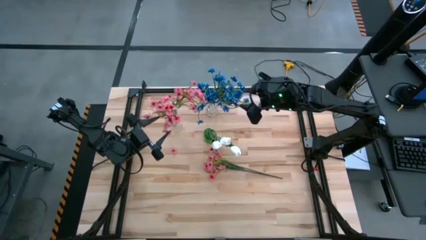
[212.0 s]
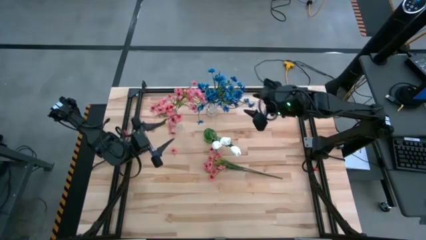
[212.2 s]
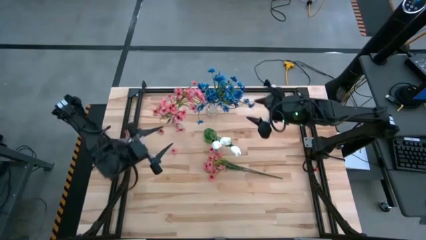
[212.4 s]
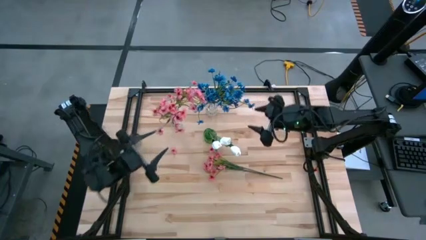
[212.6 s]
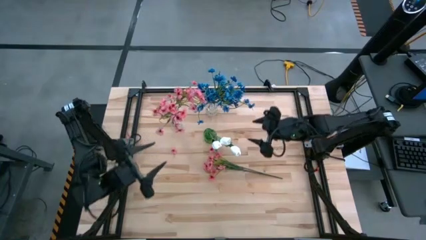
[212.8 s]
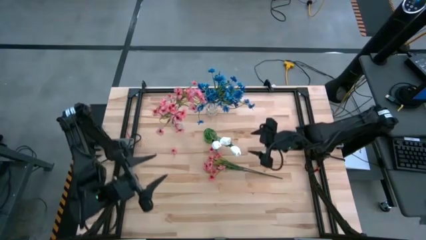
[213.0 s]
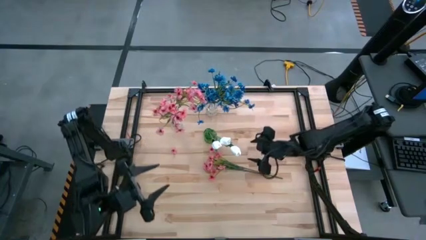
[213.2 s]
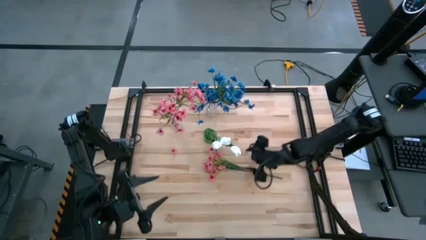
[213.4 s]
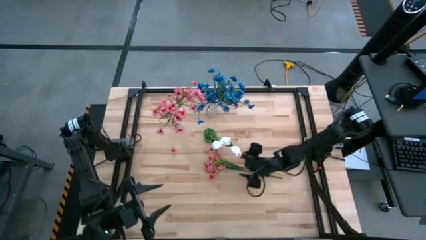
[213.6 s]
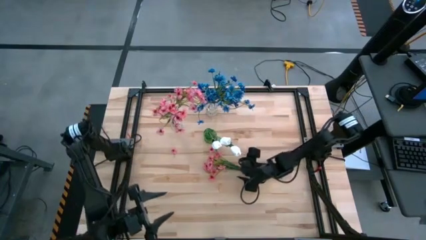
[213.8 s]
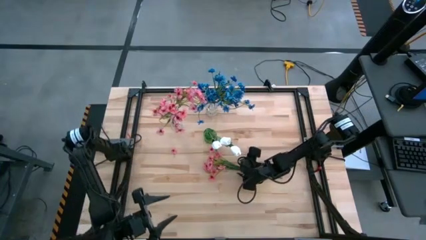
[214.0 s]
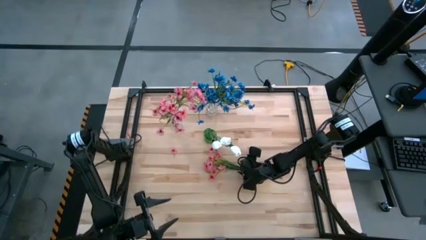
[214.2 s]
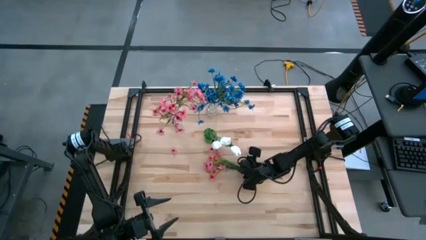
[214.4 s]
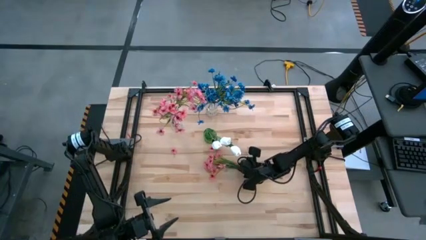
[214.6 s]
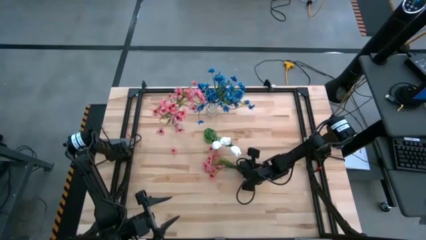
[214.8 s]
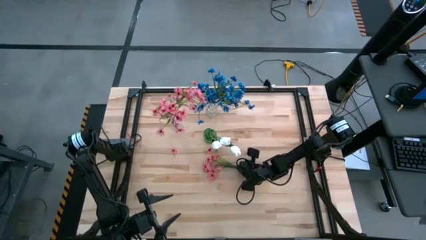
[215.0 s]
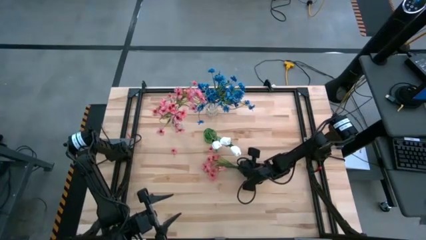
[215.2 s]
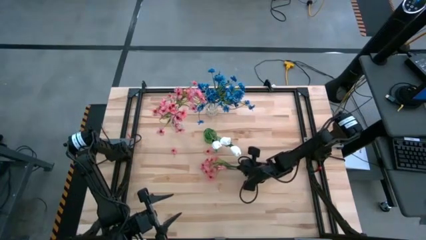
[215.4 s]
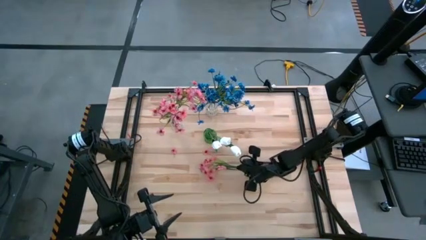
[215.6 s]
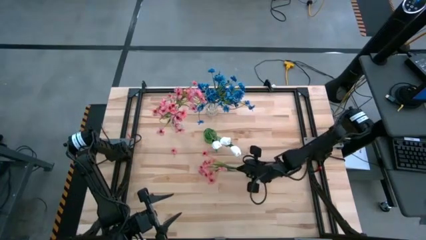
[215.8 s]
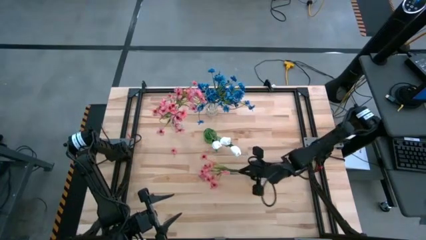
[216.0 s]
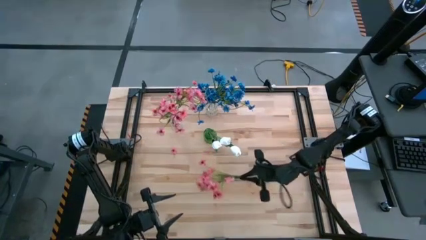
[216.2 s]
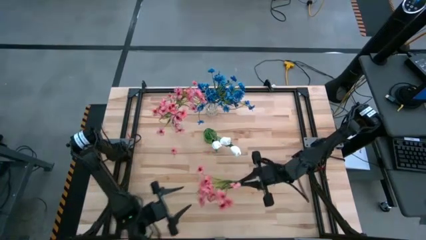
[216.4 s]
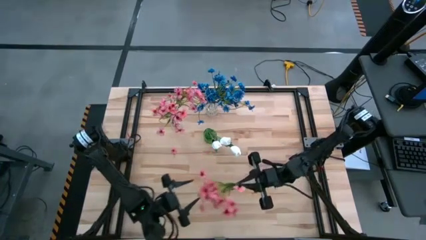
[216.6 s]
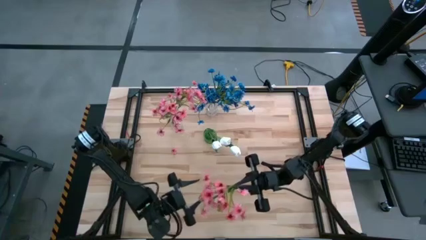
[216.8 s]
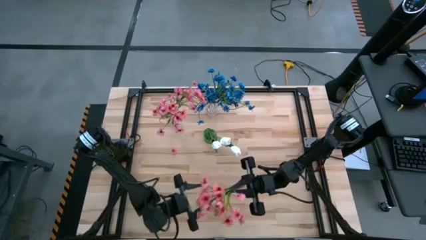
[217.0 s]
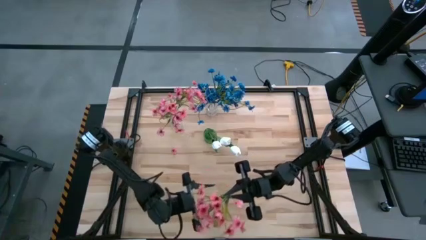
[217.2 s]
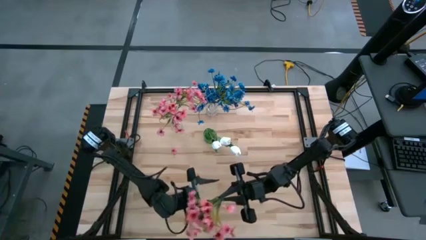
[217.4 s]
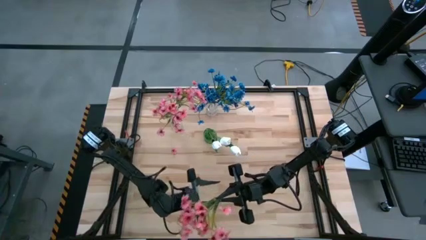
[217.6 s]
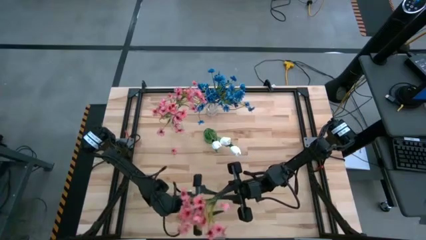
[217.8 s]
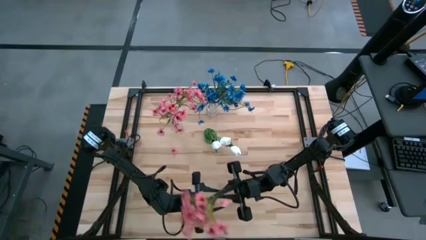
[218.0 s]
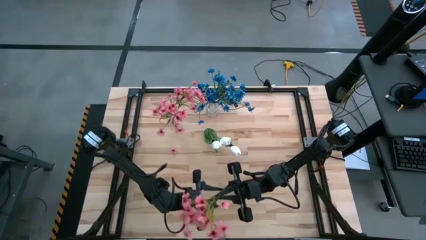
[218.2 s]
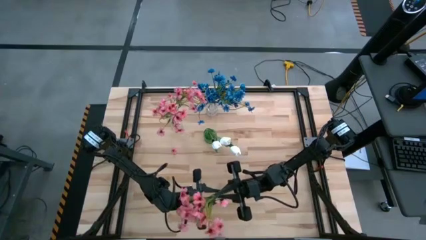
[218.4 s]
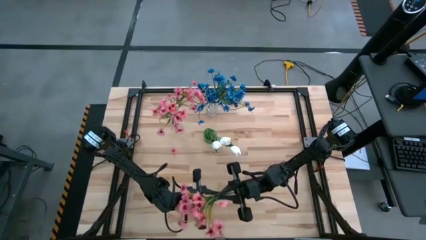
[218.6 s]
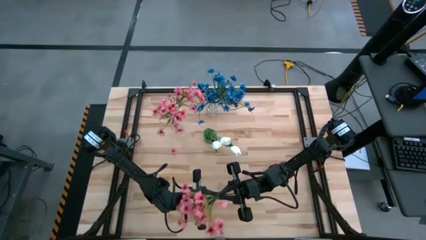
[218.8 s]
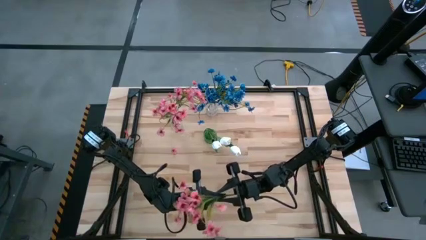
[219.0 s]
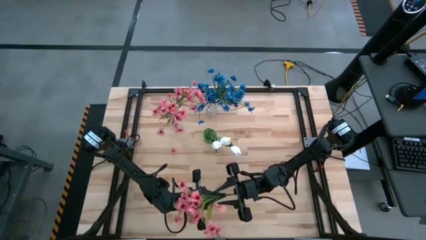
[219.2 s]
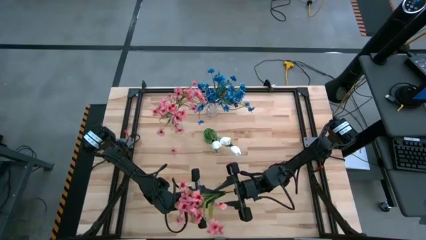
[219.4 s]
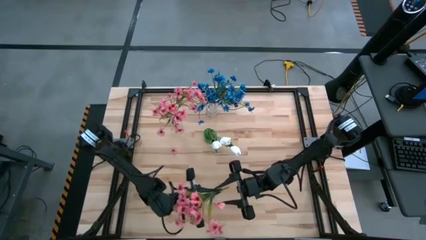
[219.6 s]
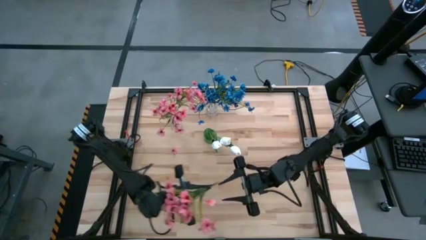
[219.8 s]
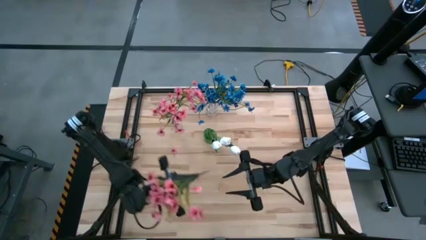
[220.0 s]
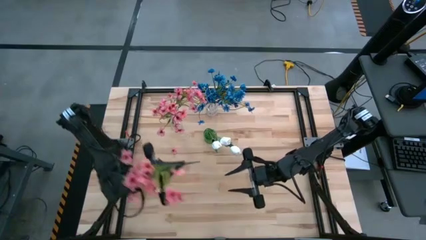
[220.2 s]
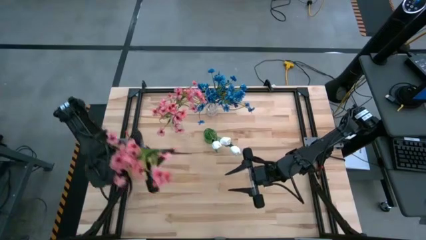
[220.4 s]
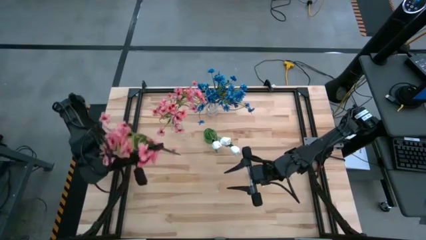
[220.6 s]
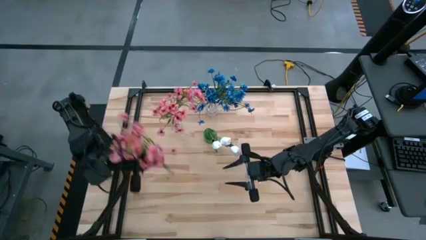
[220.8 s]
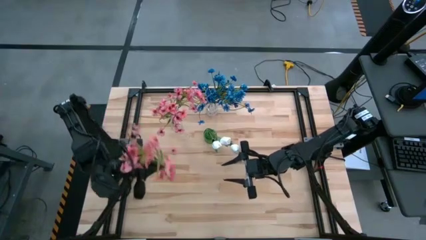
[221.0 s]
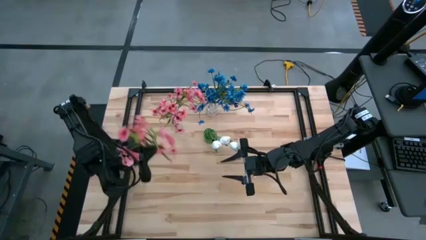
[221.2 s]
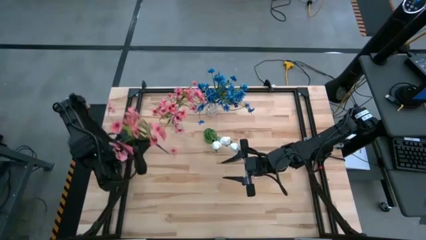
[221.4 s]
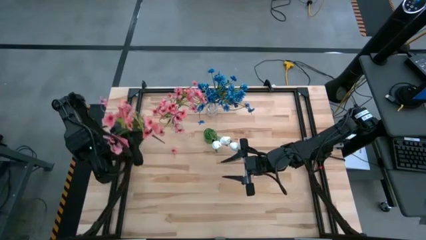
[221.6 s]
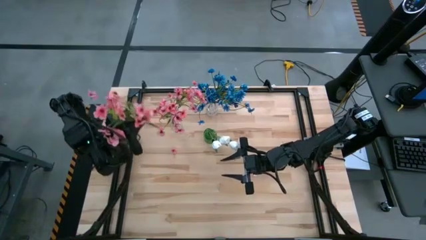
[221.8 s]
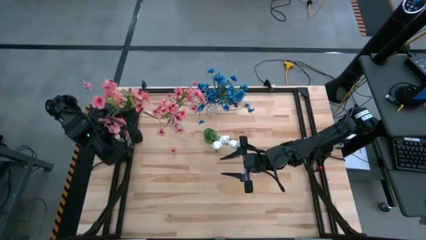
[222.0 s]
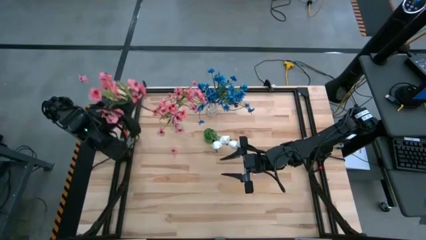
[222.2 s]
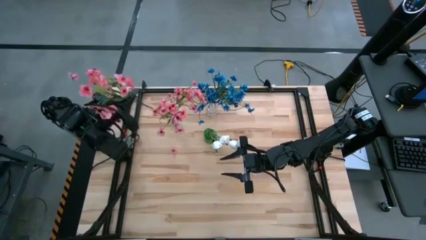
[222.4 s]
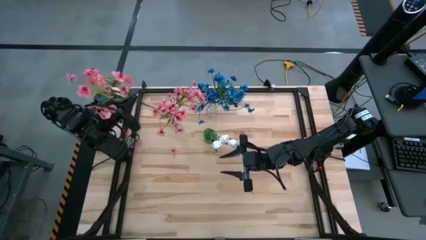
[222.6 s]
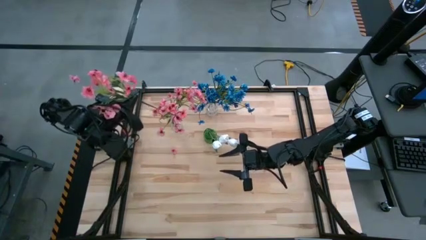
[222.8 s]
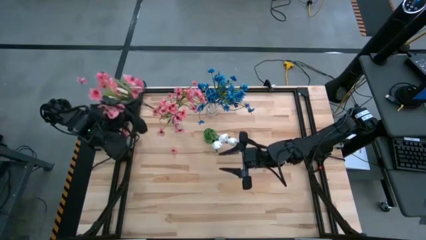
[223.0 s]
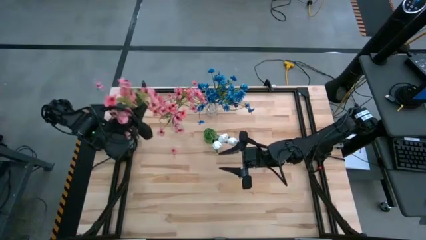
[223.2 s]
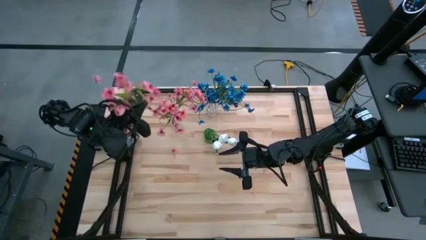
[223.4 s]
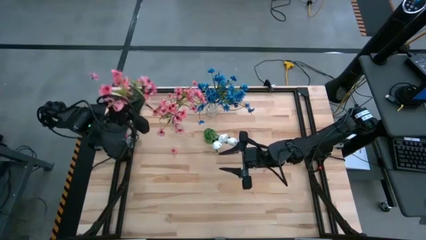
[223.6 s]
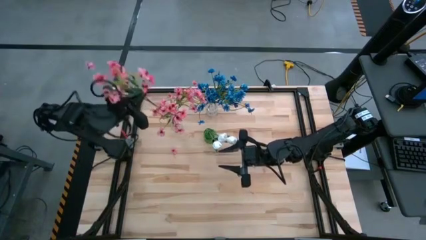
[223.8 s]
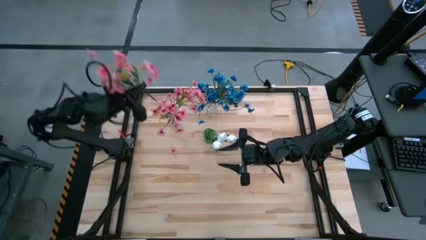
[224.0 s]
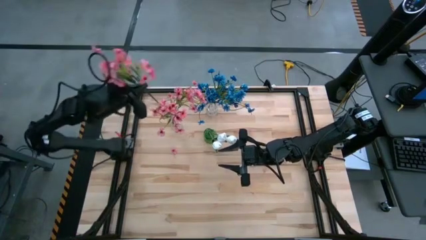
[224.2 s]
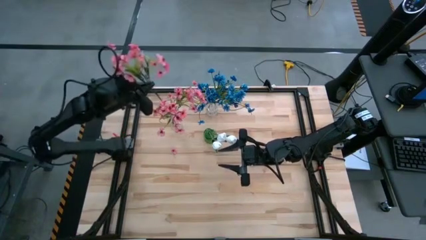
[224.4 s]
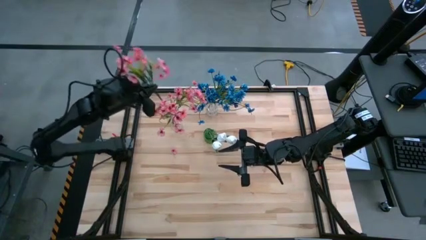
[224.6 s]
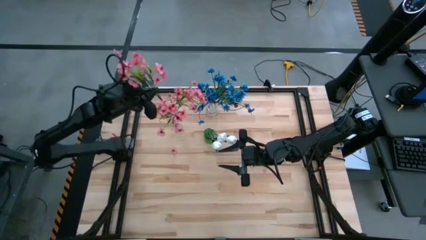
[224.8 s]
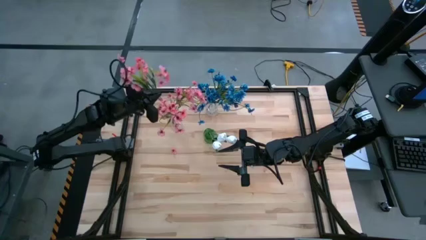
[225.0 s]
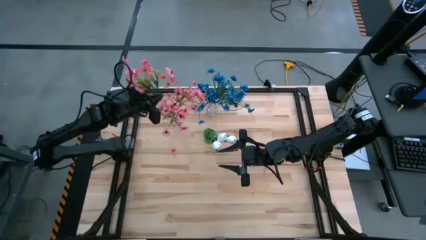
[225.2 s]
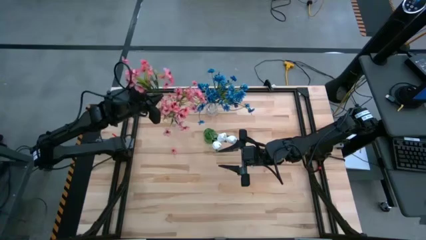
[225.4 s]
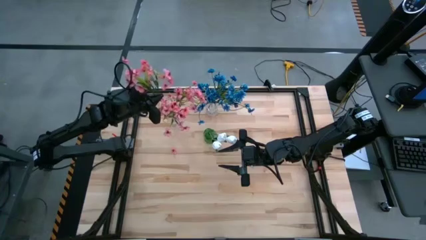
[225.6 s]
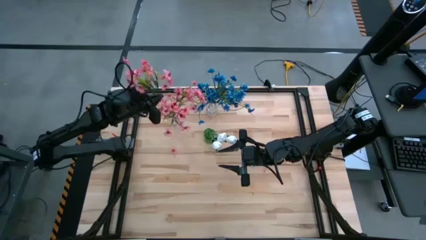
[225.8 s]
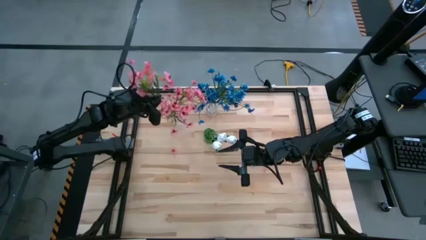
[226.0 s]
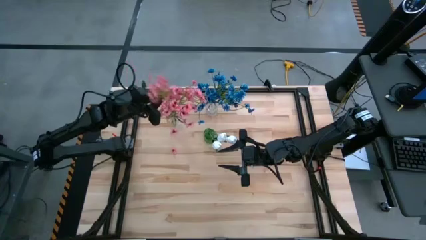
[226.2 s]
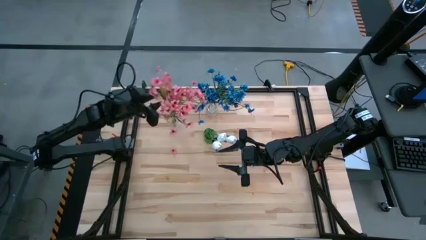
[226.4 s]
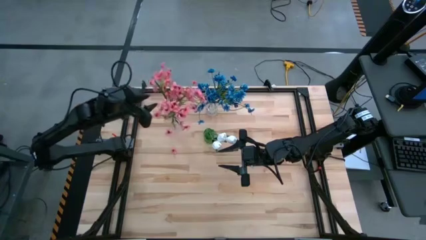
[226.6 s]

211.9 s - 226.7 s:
Task: Sort flowers into vase by color
Put the pink flowers into the left transparent vase

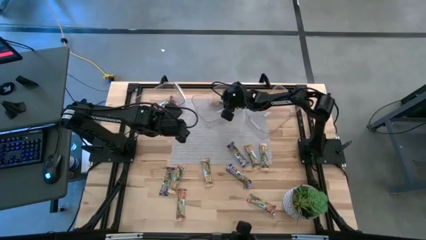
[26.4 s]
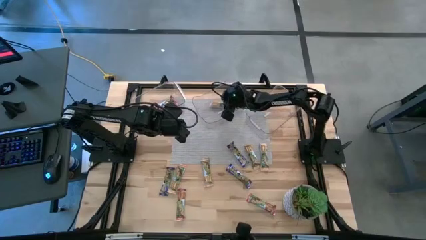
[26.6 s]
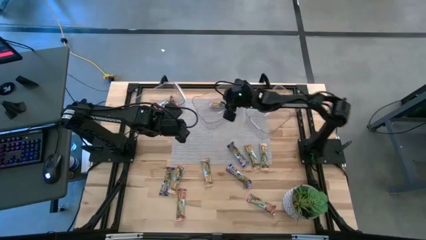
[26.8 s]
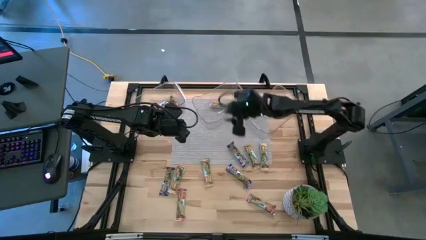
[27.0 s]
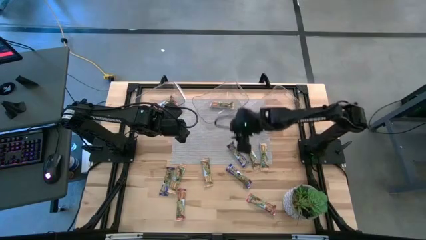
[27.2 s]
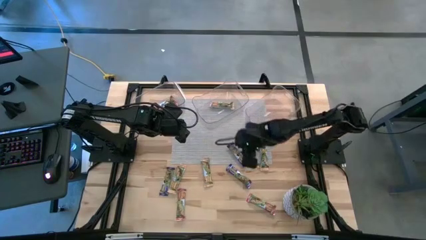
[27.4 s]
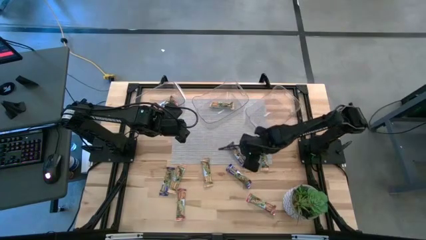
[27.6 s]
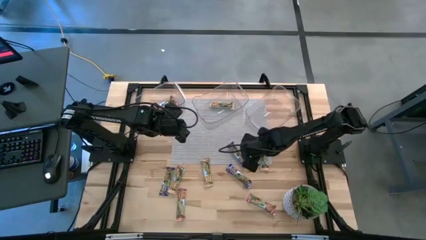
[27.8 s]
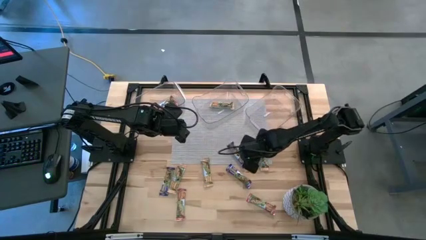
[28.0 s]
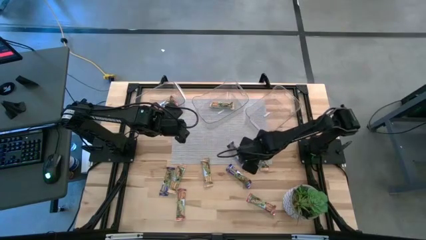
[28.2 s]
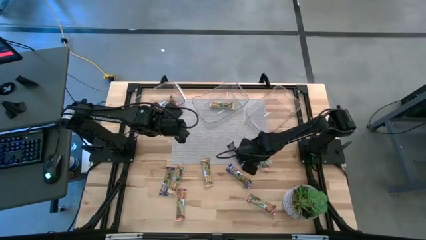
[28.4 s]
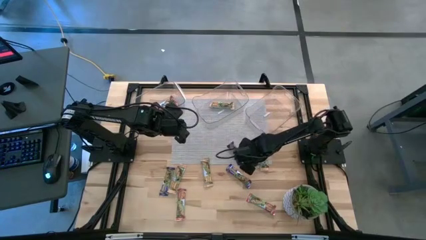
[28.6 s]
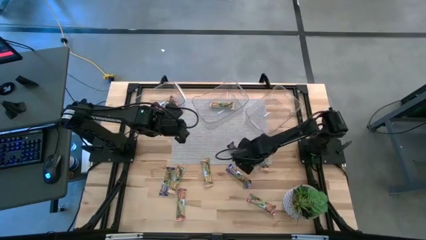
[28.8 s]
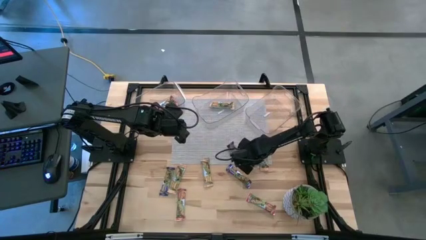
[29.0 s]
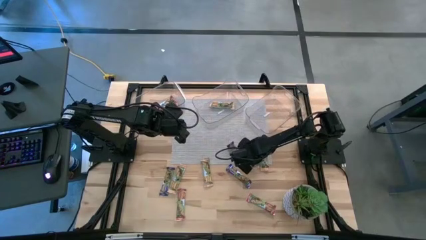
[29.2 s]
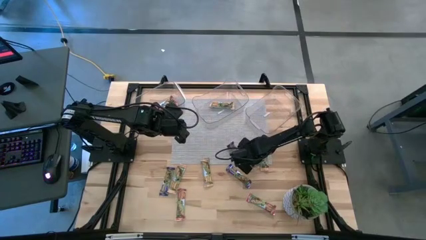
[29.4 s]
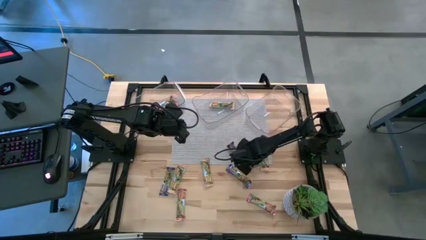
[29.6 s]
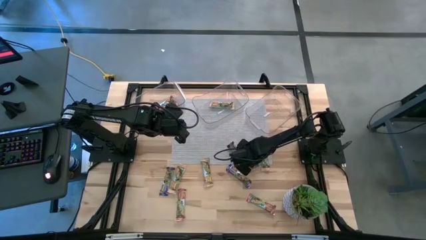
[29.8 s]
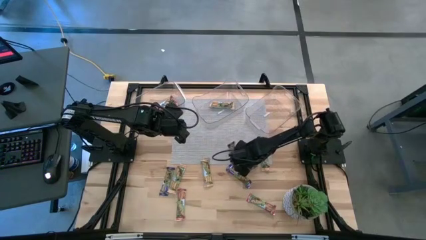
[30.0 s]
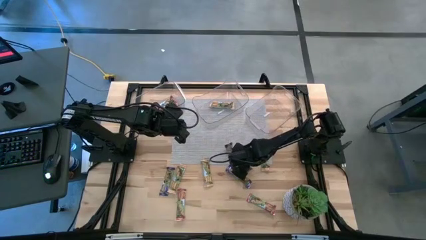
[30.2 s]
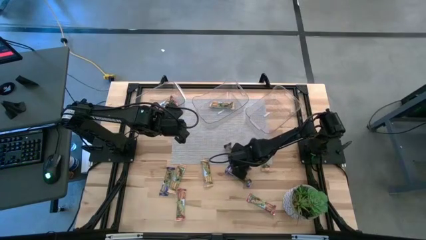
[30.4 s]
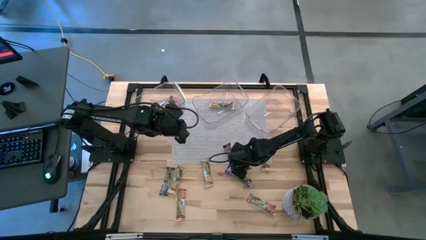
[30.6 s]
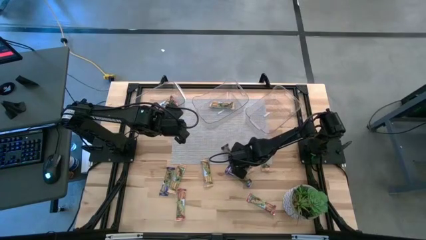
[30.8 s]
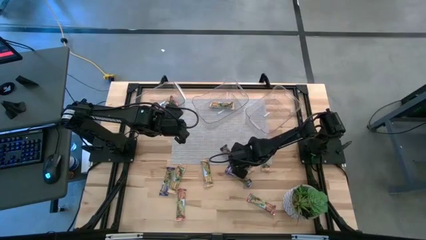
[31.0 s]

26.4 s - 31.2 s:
Task: Pick and place Granola Bars by type
Put the yellow granola bar into the middle transparent bin
